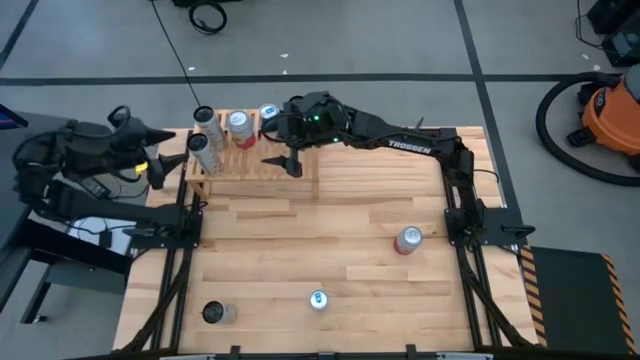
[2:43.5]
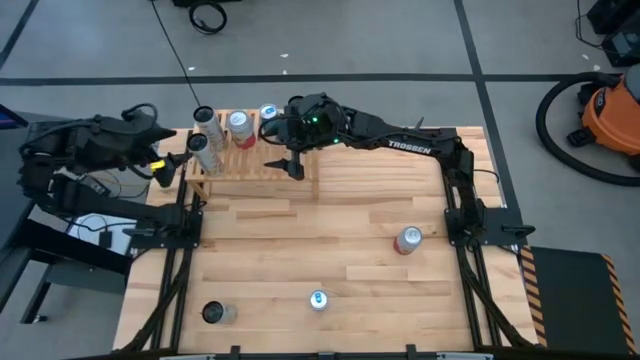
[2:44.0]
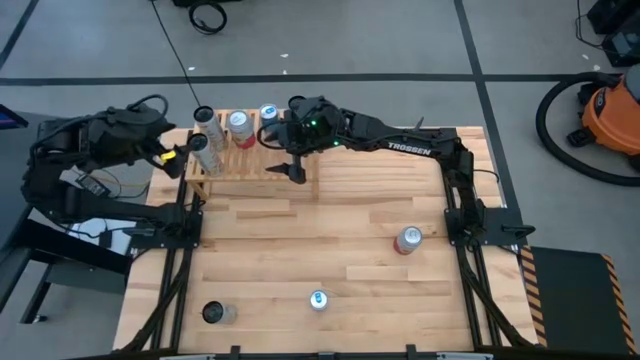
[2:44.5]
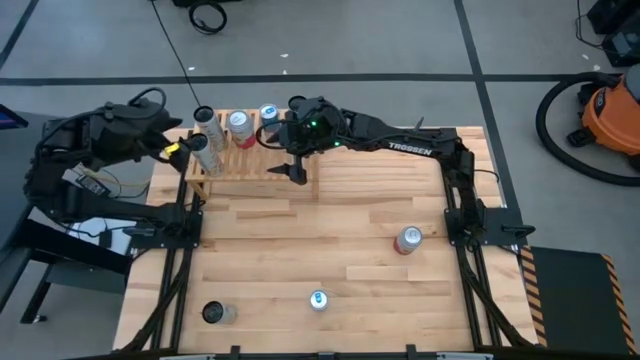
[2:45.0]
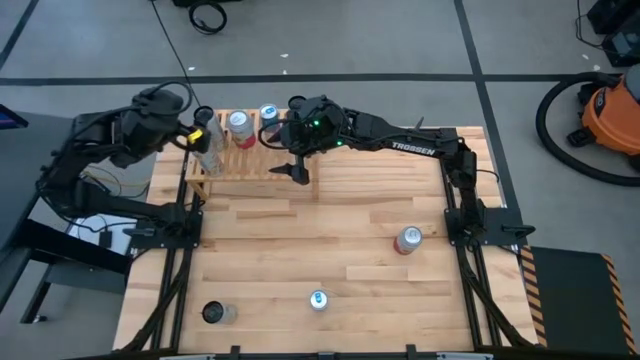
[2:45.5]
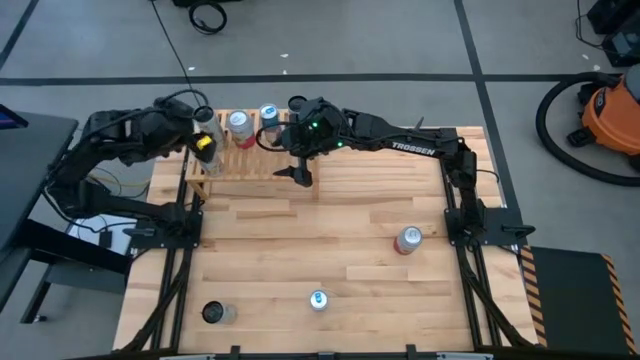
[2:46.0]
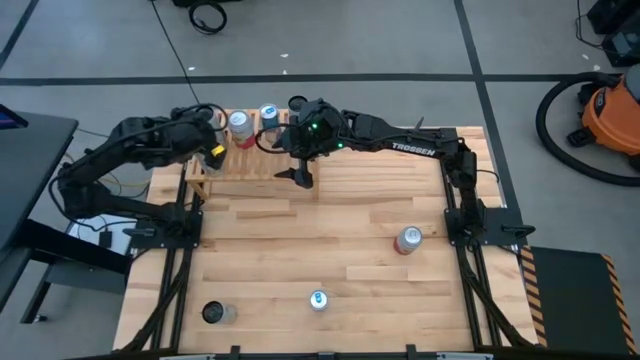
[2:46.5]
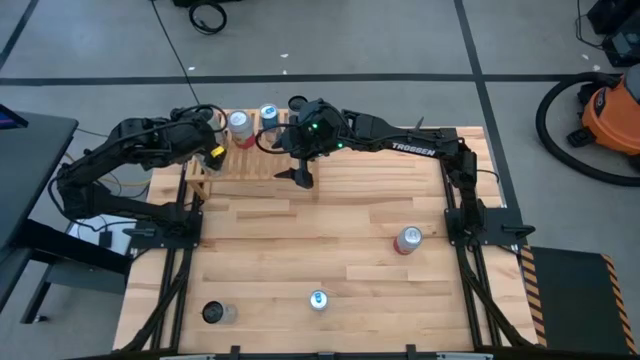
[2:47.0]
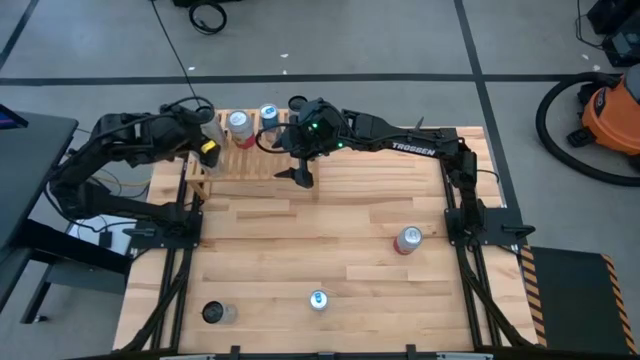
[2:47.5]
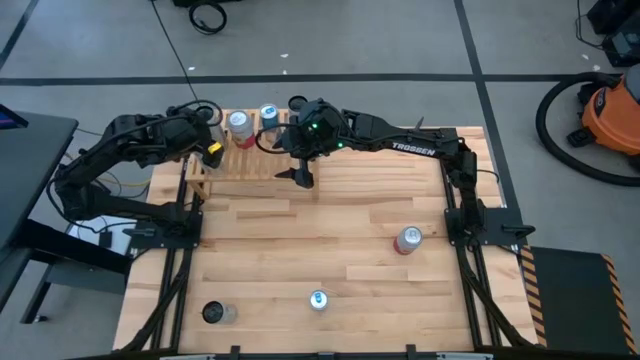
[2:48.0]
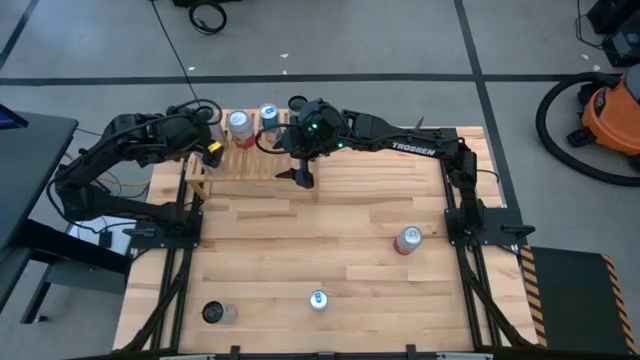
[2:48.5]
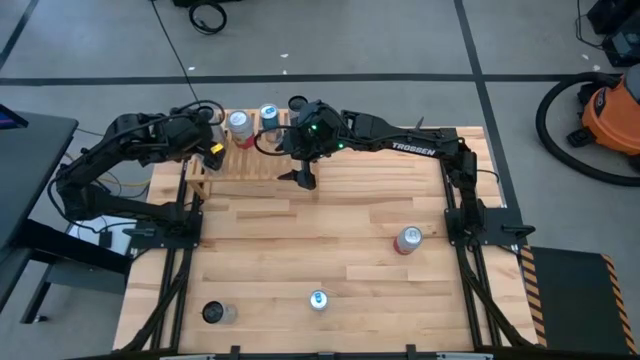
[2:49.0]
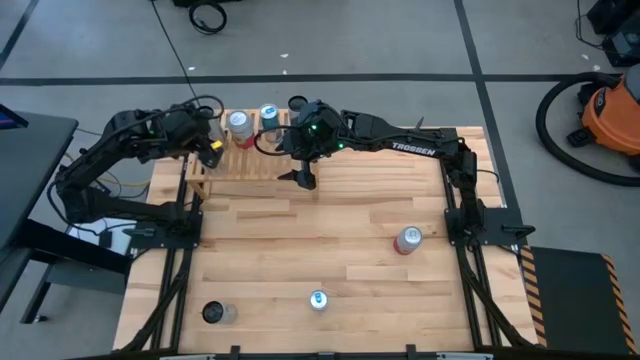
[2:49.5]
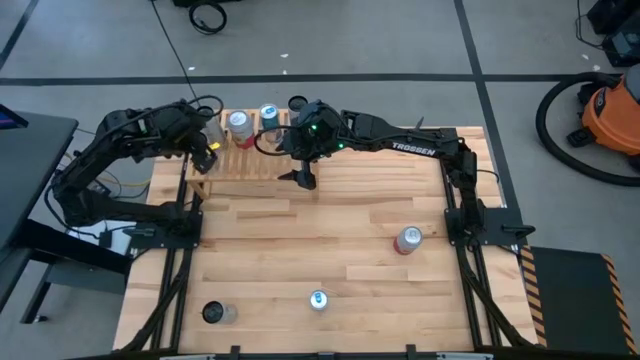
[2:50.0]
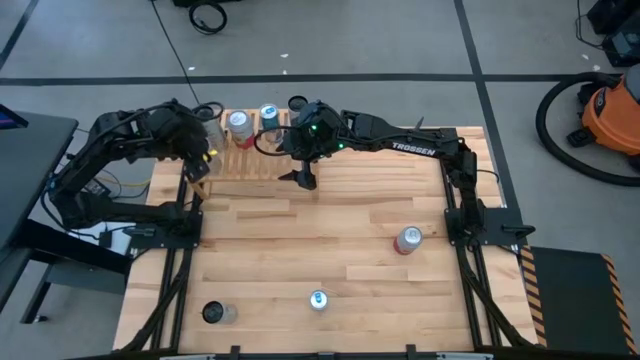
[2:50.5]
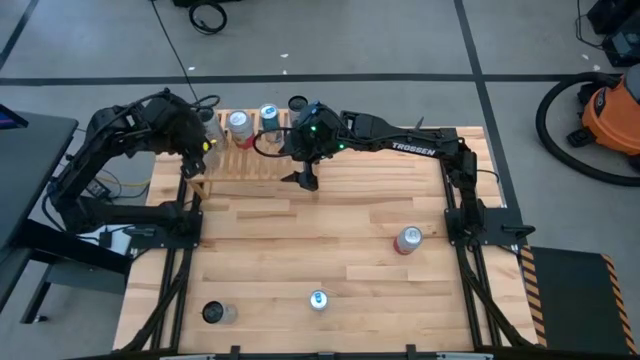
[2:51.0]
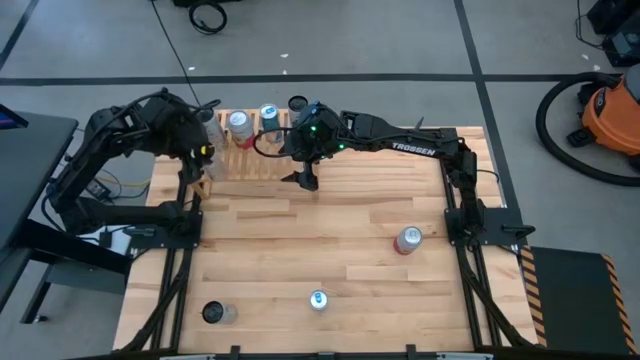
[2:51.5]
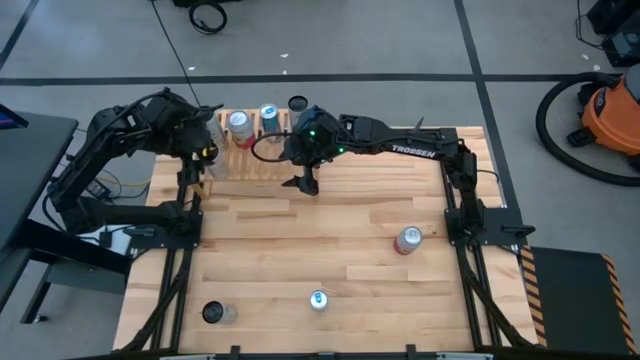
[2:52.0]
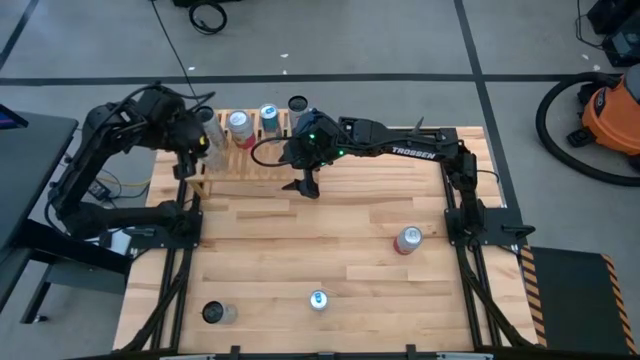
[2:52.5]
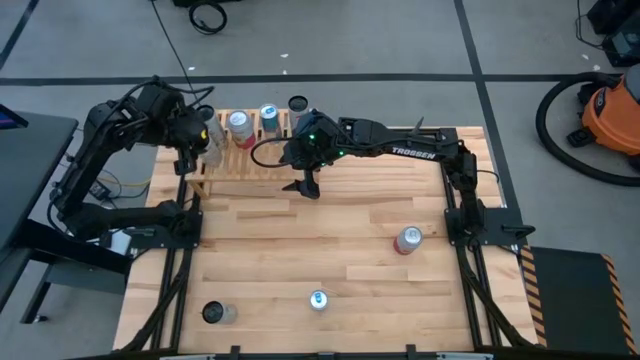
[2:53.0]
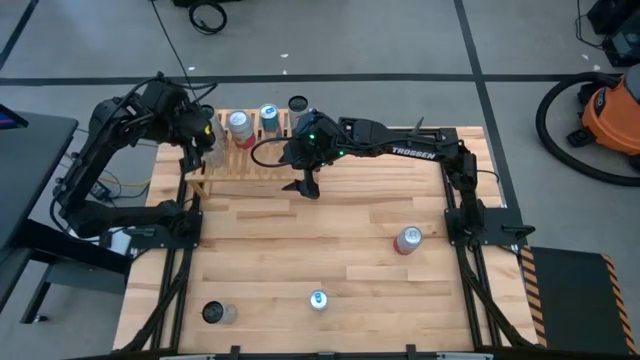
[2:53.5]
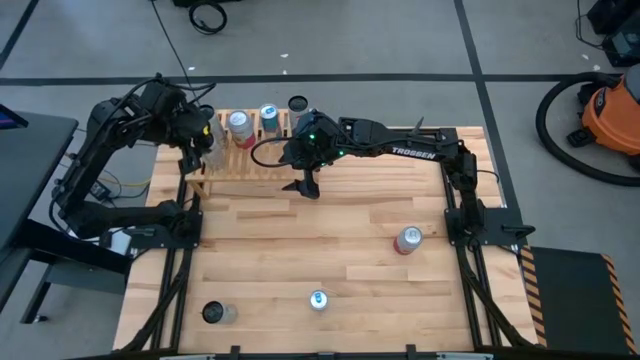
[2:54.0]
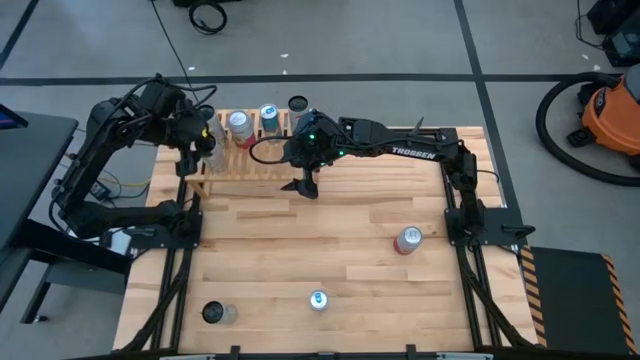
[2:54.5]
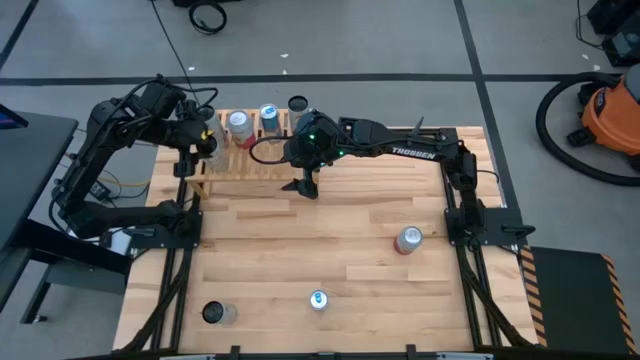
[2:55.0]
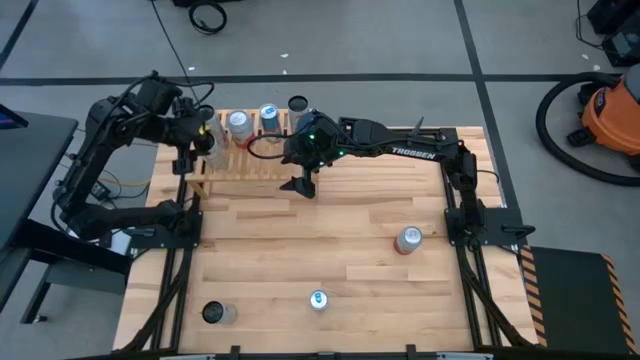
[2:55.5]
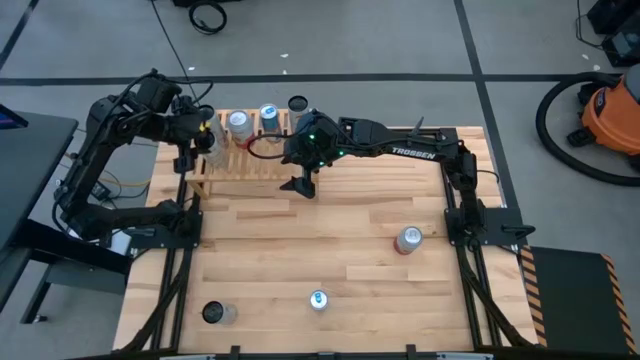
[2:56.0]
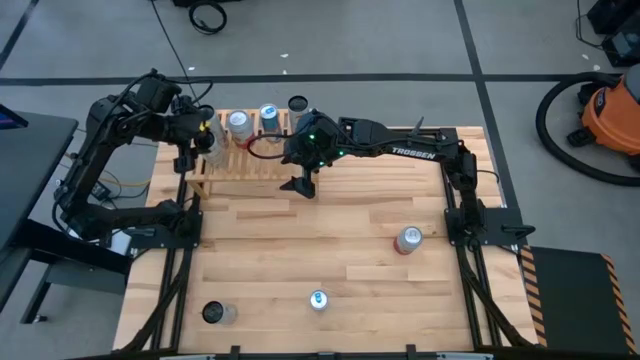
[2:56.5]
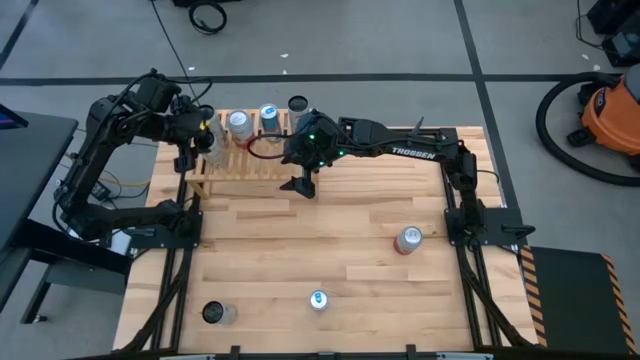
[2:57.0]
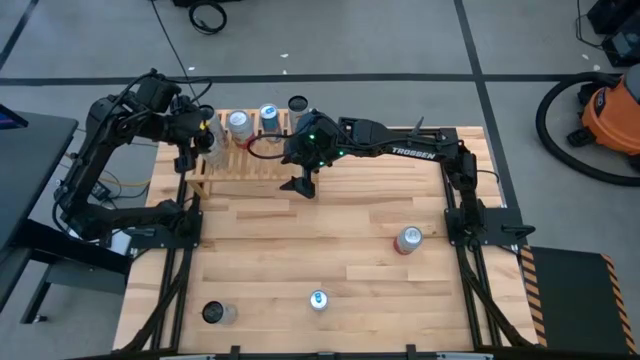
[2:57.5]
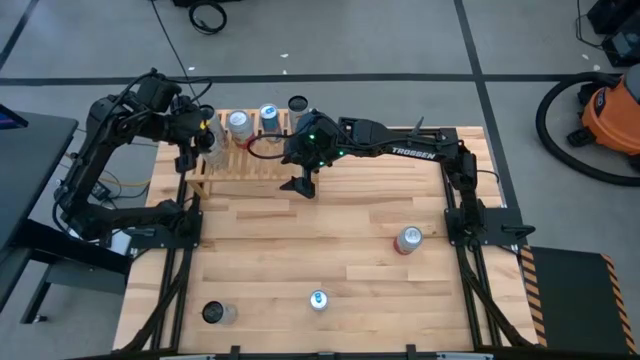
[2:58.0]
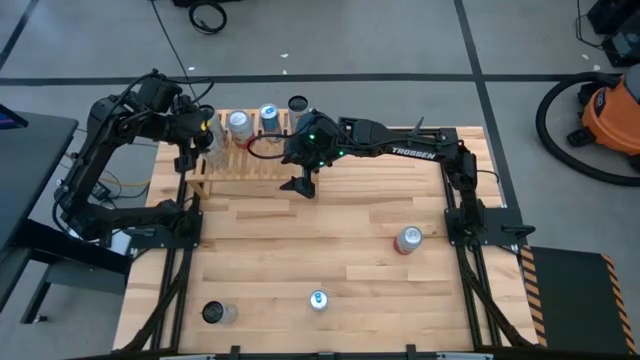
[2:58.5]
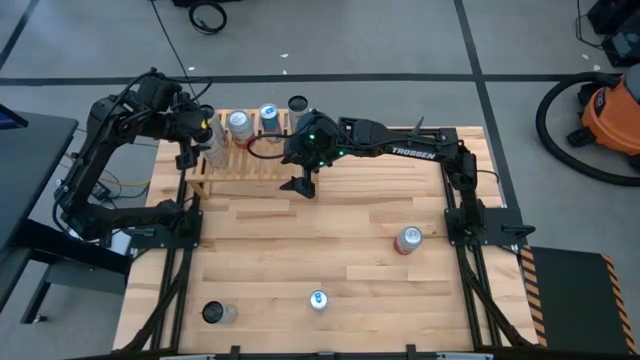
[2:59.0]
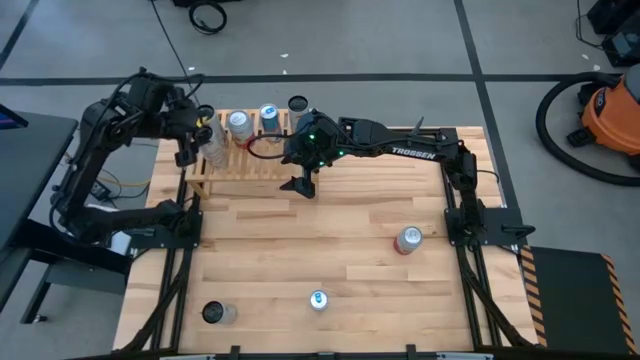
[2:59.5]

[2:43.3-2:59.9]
Task: Place canned beverage on shelf
Put the white yellow soda can on the shelf aligned with the other white yellow soda can

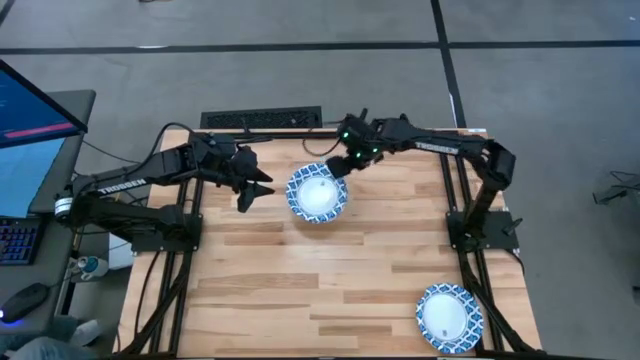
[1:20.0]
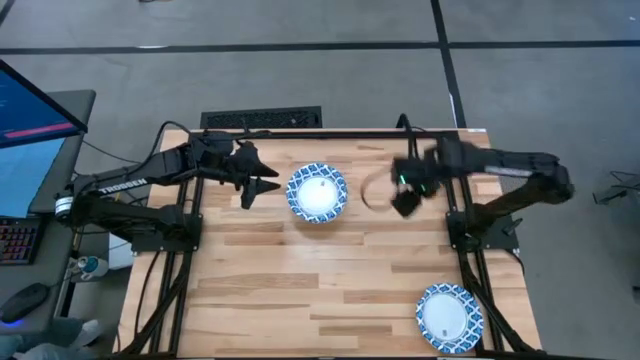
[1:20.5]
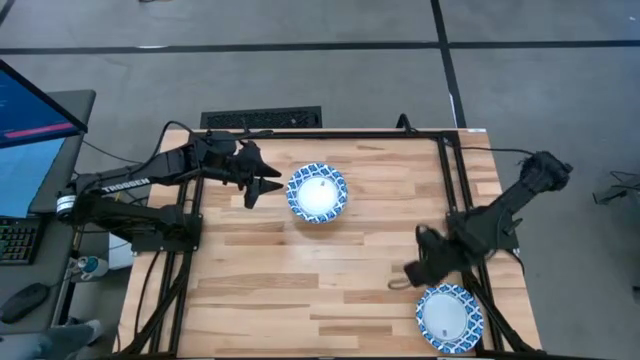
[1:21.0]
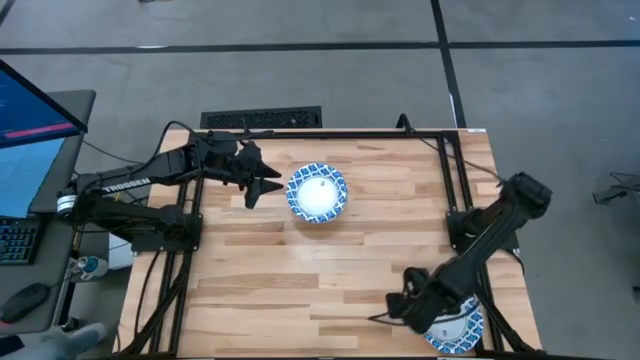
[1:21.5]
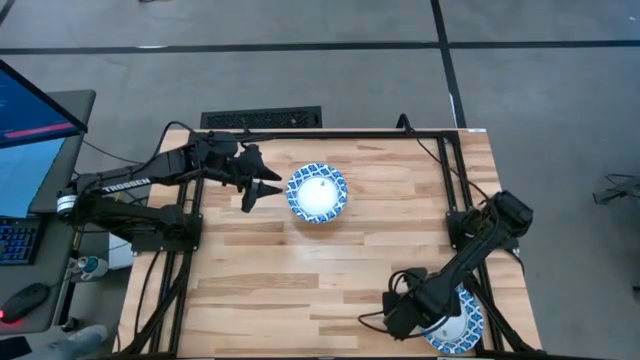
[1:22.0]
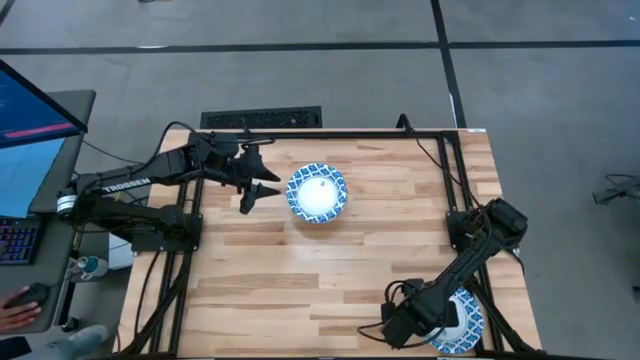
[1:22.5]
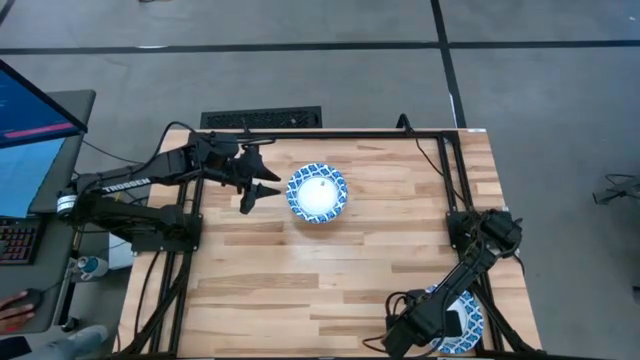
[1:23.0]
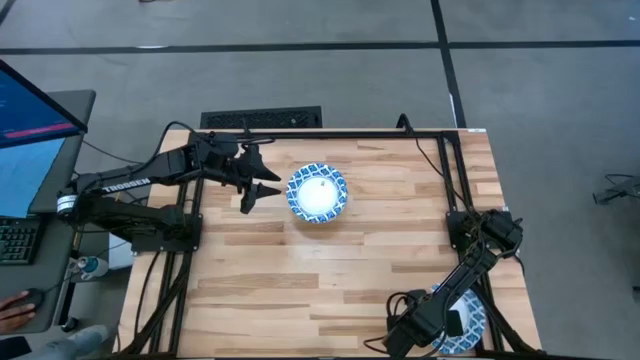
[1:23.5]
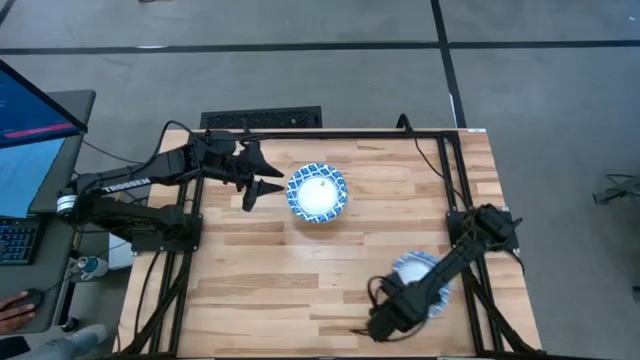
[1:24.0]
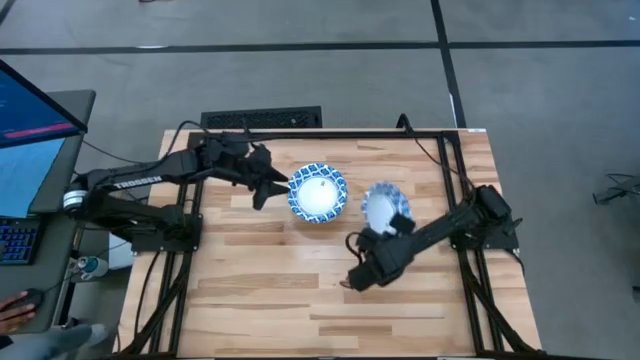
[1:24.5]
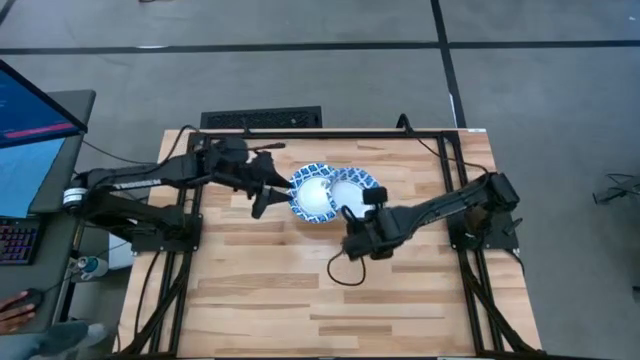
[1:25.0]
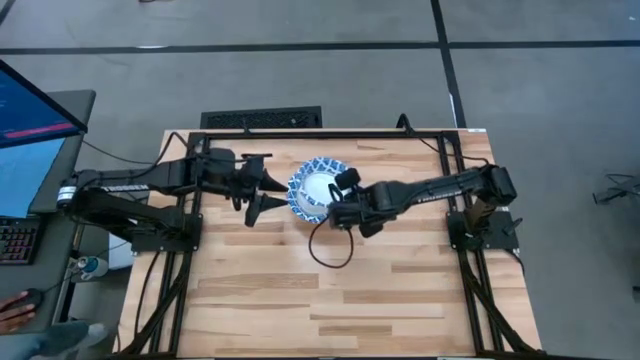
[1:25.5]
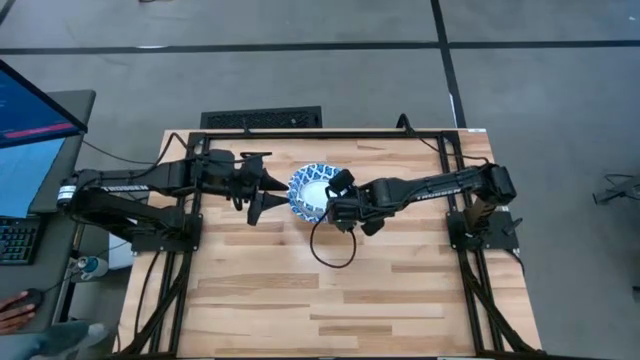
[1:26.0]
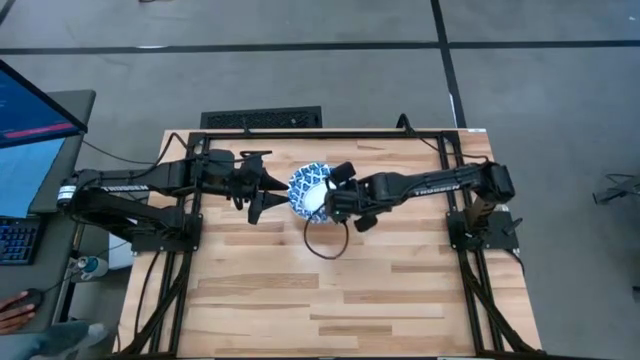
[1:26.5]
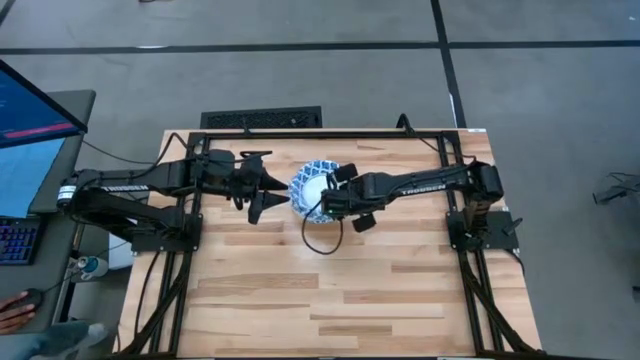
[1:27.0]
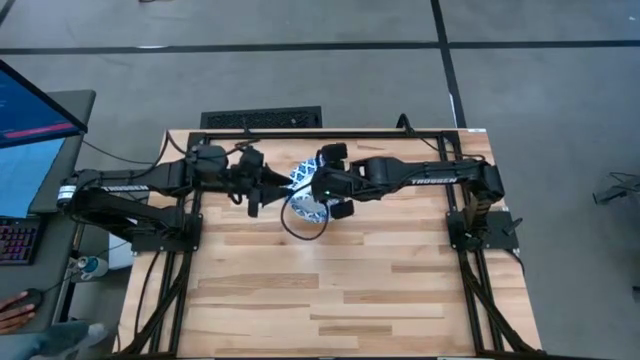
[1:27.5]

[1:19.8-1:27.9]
Task: Nest bowls inside each other
Stack the white bowl on the stacked white bowls
